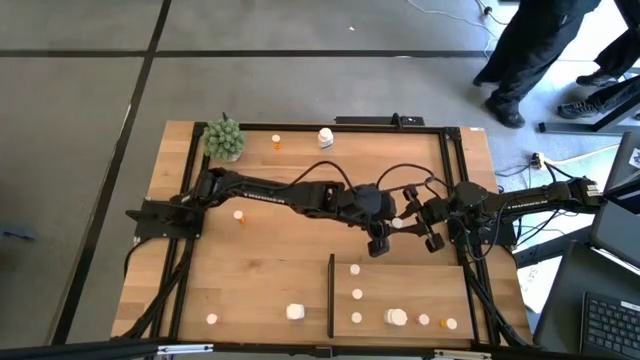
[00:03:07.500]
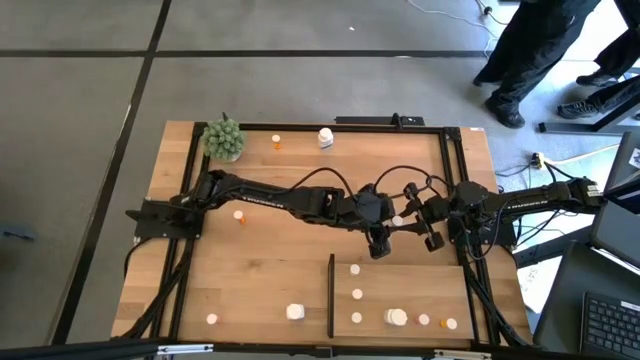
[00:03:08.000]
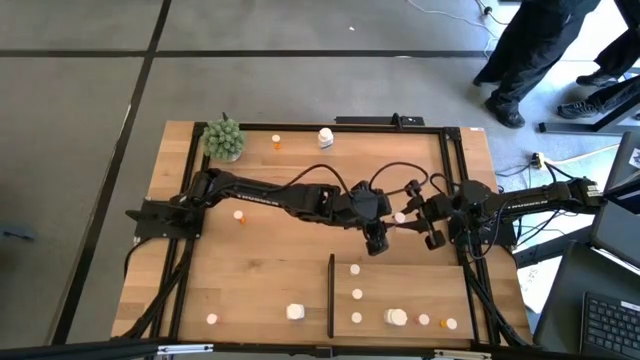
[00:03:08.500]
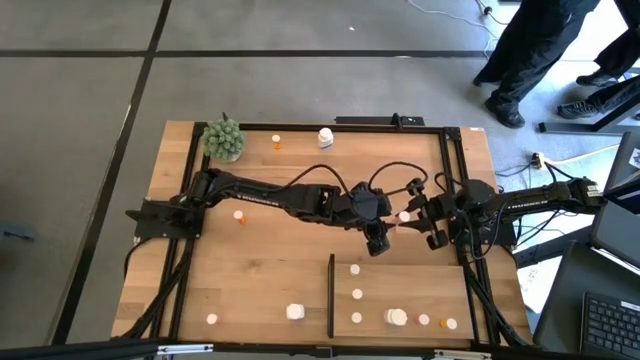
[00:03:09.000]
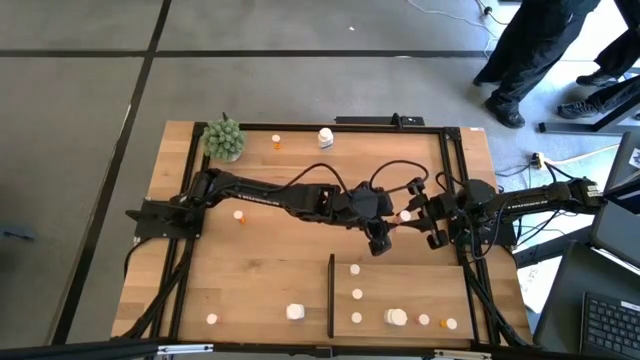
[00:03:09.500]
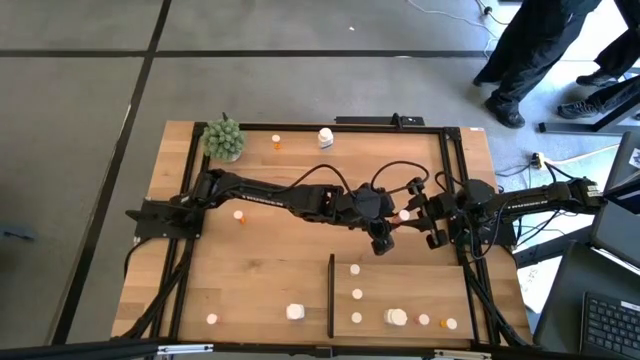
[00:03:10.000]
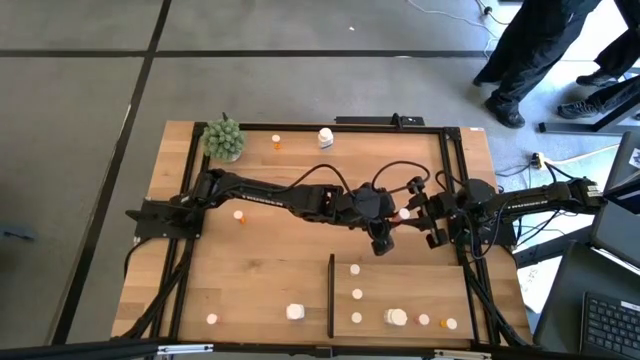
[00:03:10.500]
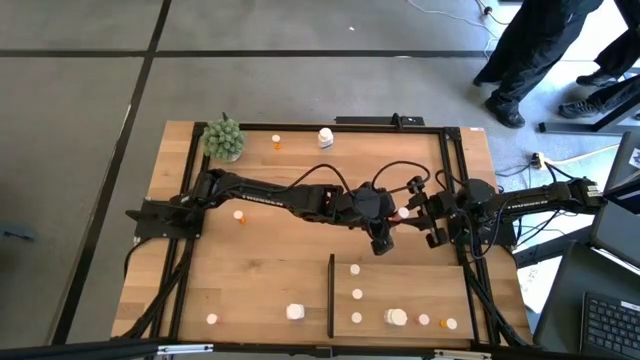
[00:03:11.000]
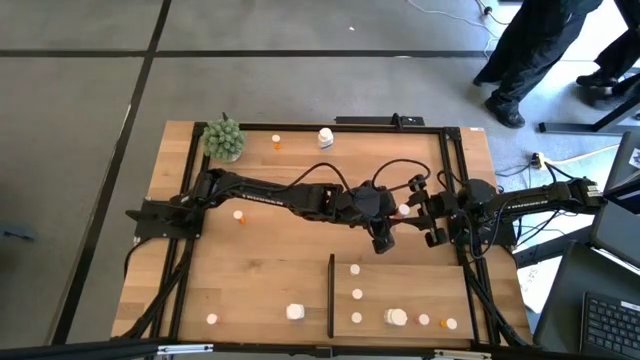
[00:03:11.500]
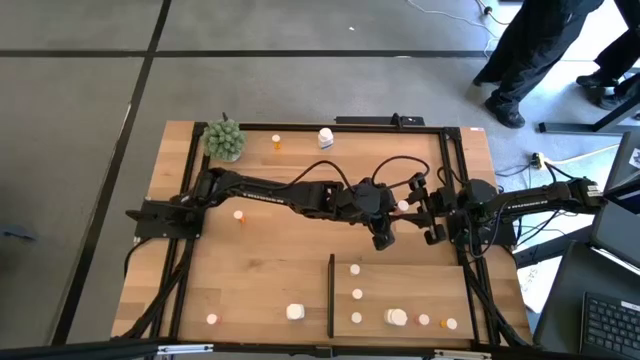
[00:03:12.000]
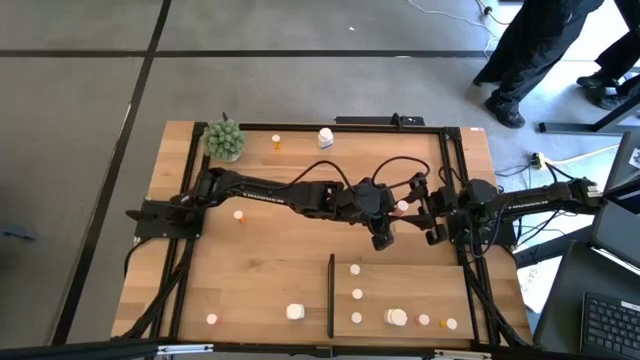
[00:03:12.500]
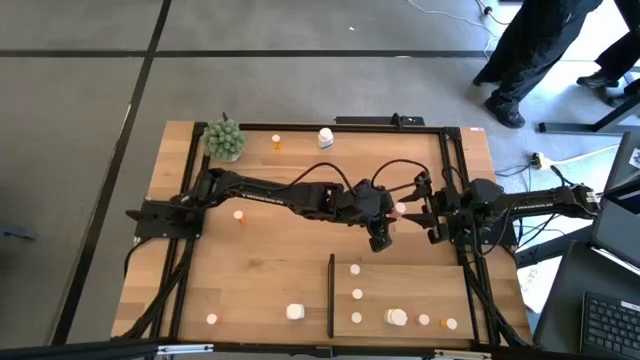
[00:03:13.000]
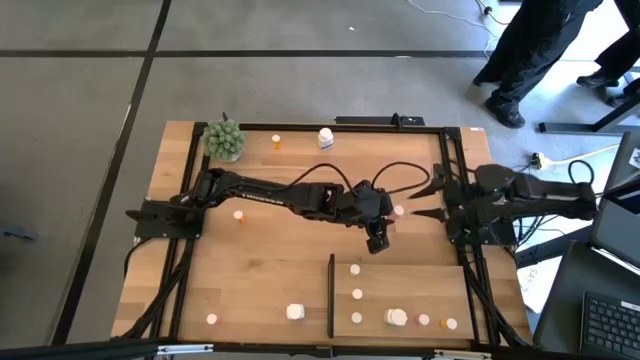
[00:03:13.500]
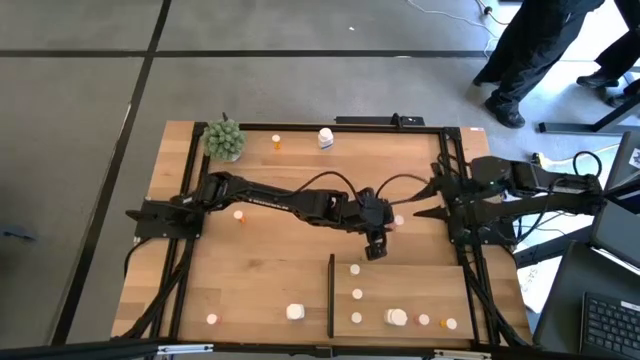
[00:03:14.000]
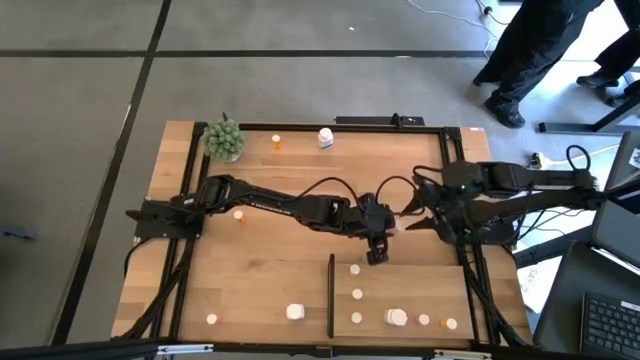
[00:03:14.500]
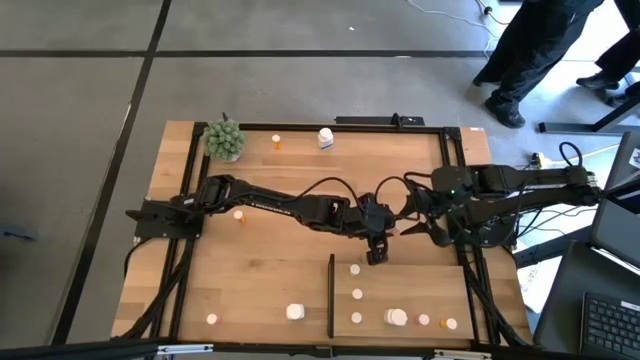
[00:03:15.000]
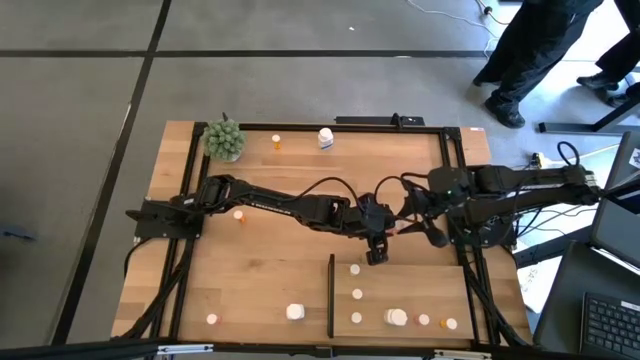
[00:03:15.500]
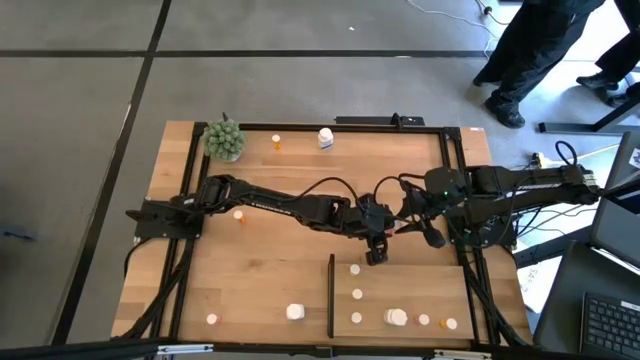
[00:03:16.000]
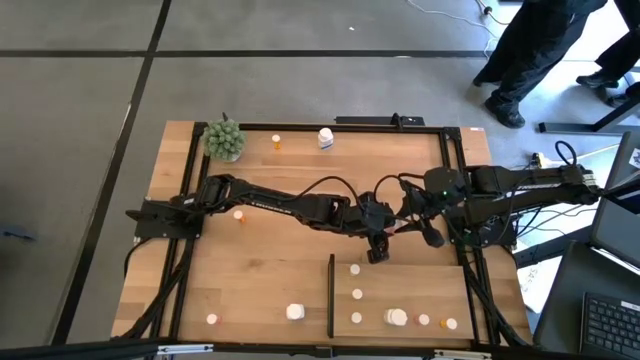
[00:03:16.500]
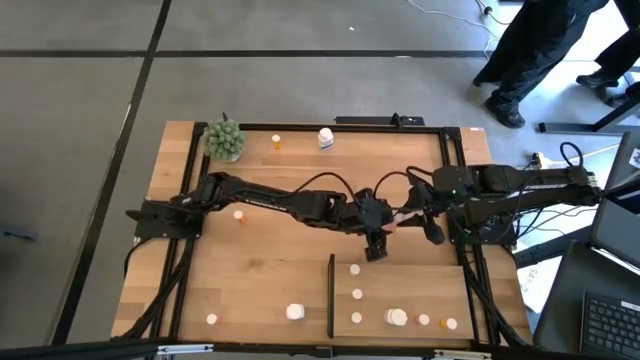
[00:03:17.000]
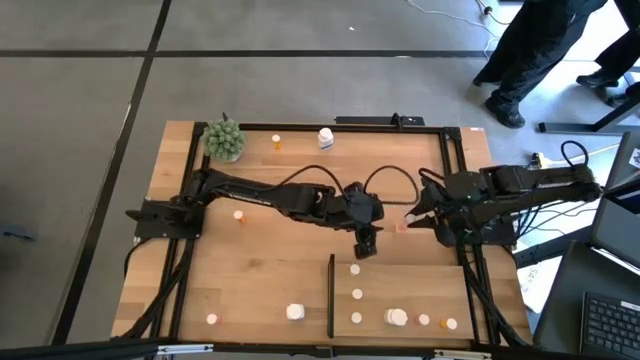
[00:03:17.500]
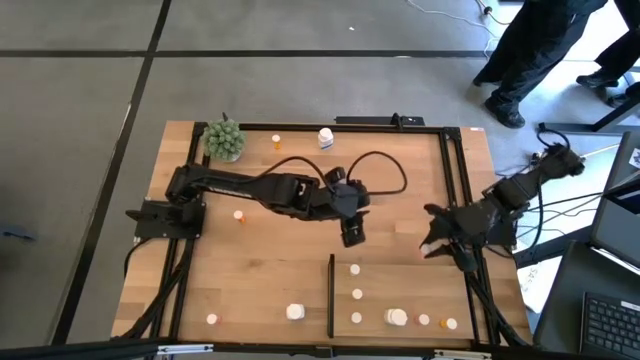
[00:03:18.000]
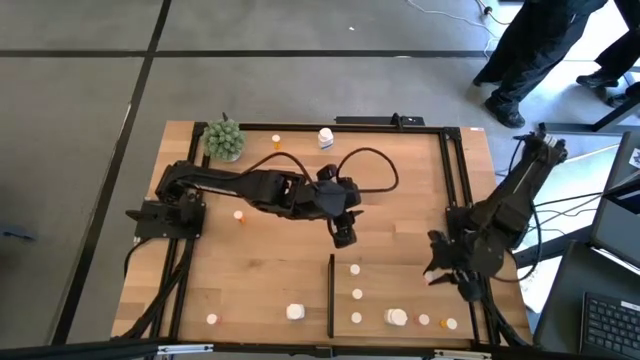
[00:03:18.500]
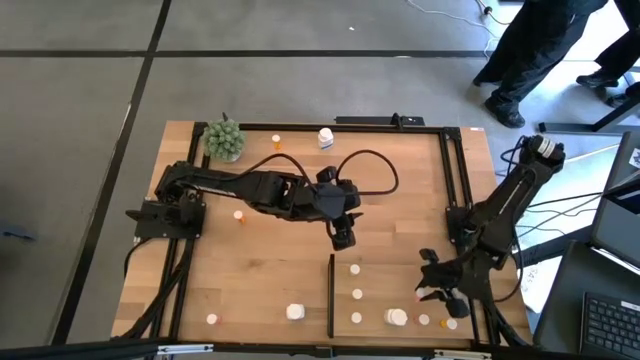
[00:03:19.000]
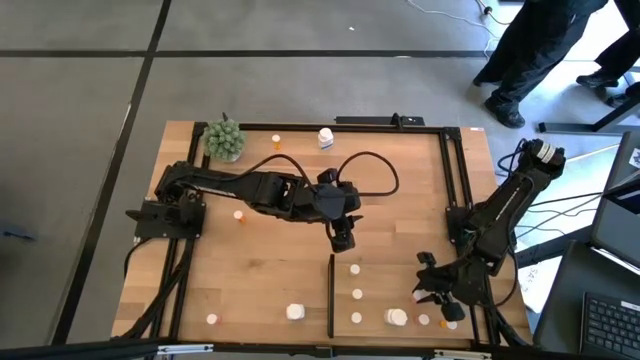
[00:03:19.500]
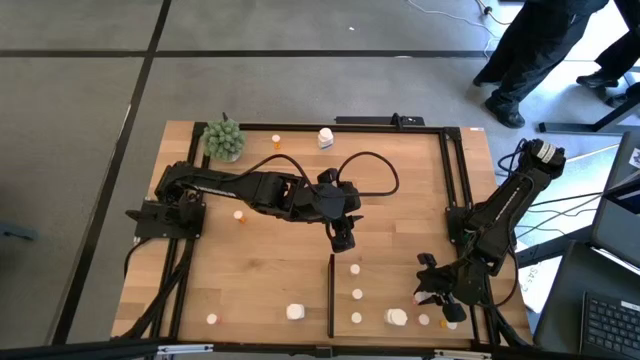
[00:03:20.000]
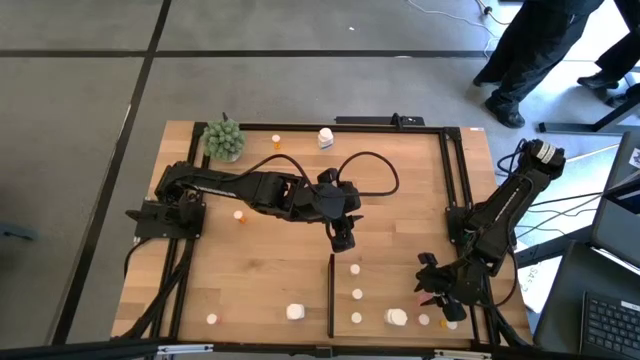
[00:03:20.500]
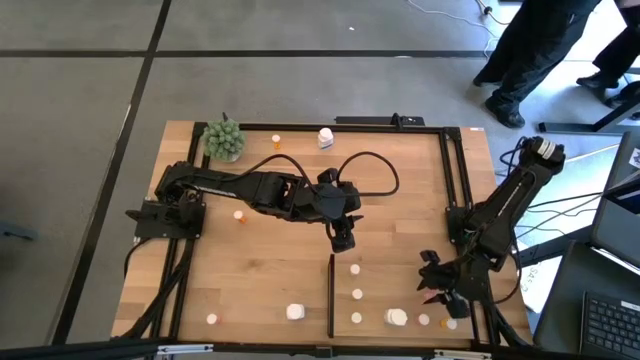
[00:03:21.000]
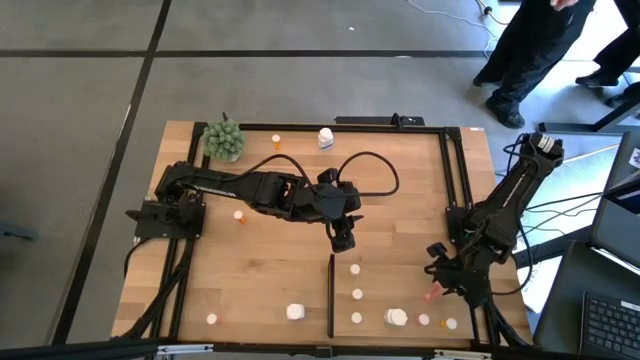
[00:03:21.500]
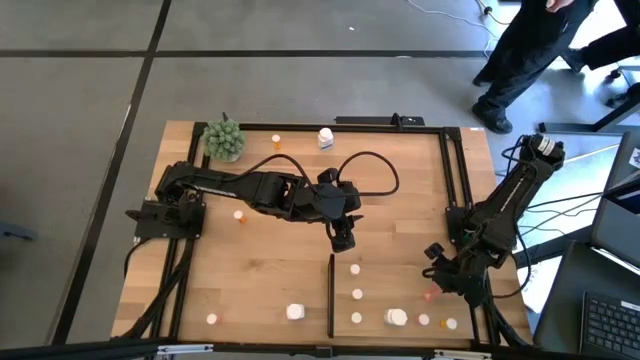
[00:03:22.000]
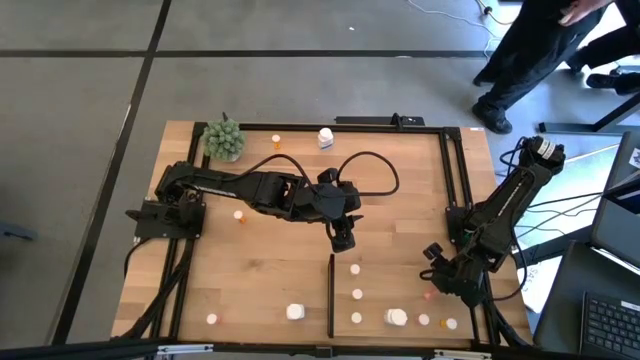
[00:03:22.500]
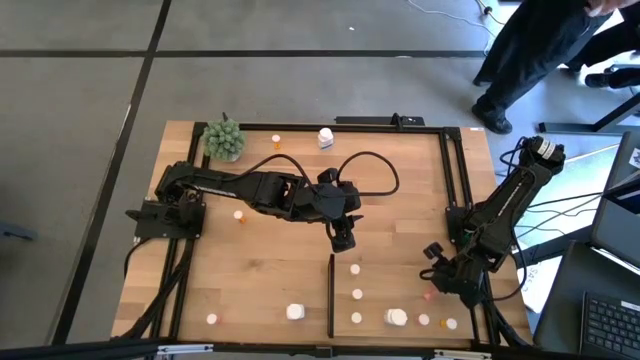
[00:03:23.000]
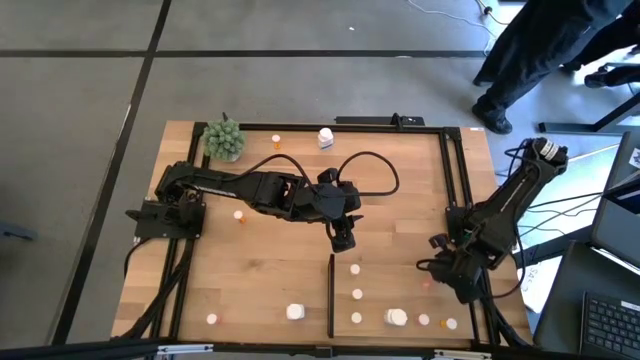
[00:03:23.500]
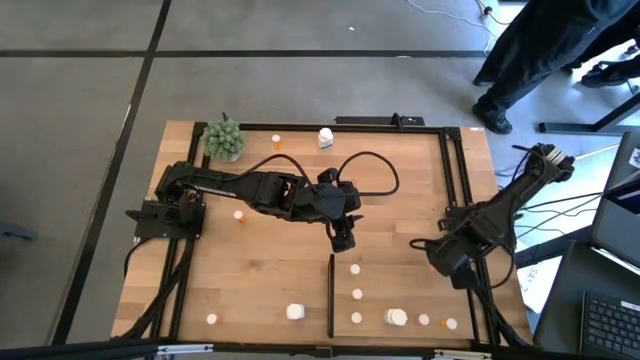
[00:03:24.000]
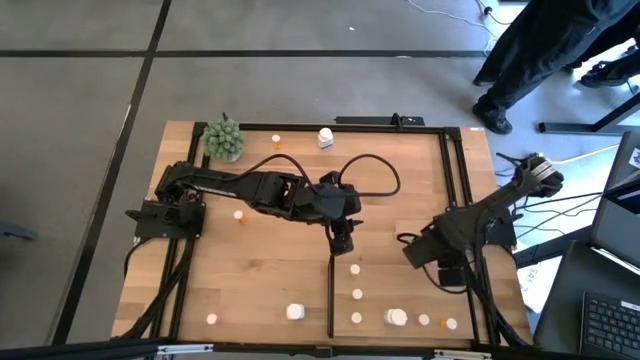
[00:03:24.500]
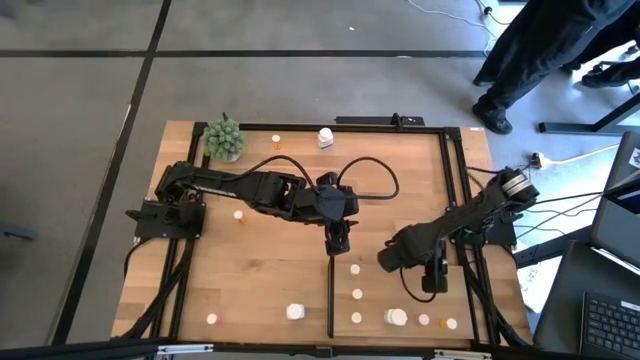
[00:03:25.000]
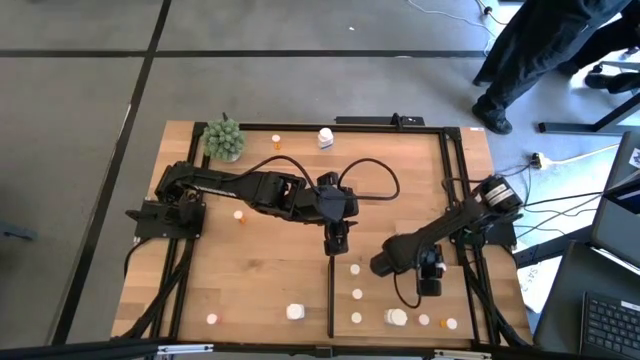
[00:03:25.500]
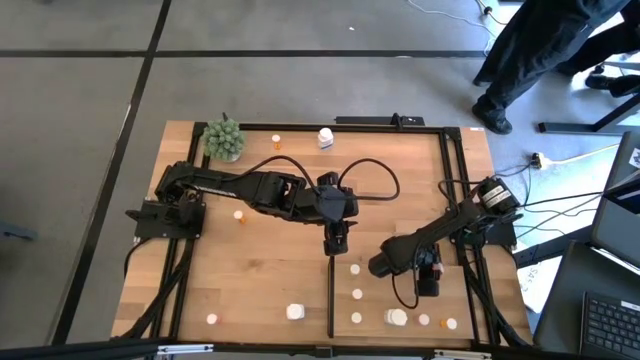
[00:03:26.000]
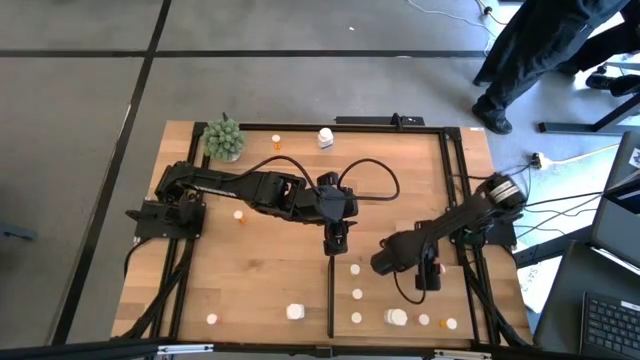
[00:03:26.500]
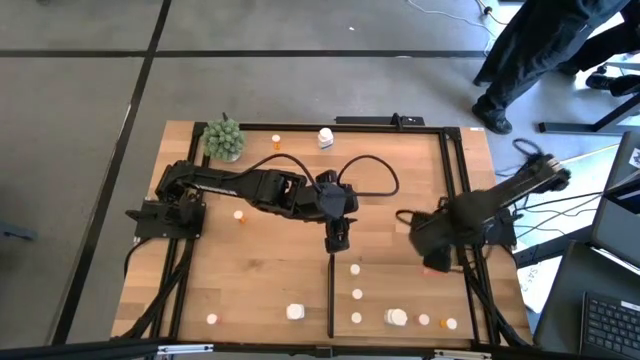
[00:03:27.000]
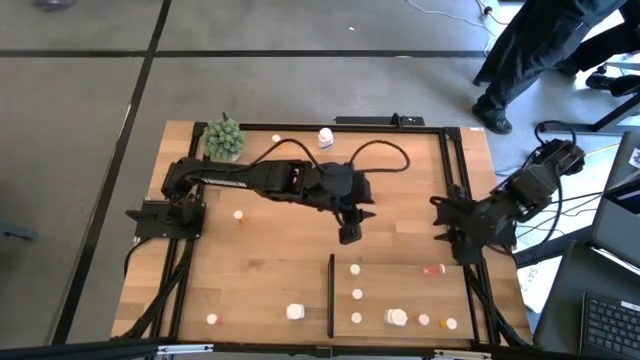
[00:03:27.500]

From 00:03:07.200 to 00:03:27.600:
Task: Pick and place medicine bottles onto shelf by color
Put the top pink pill bottle on the shelf aligned with the other pink pill bottle

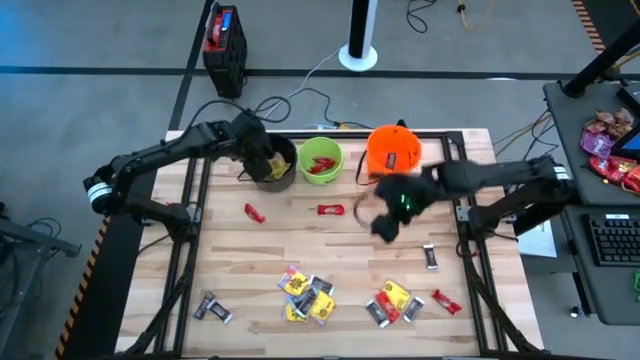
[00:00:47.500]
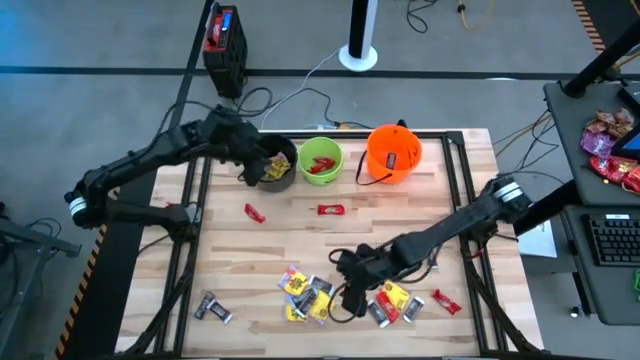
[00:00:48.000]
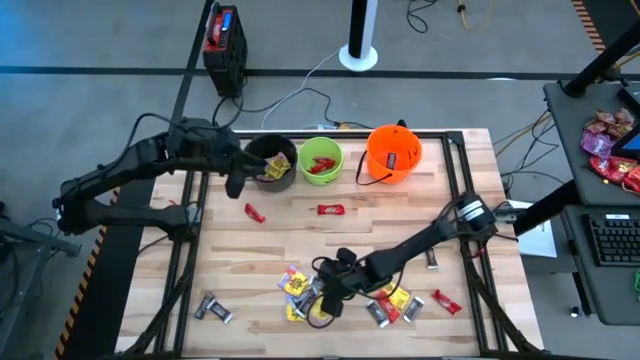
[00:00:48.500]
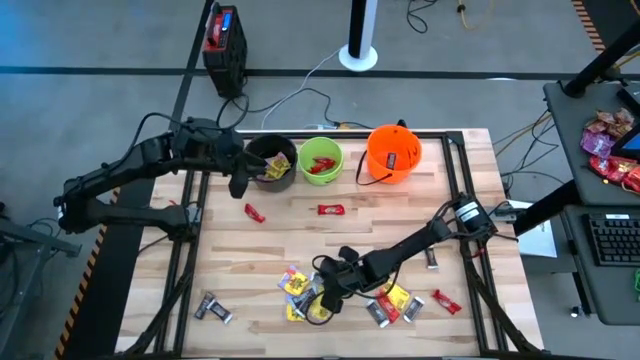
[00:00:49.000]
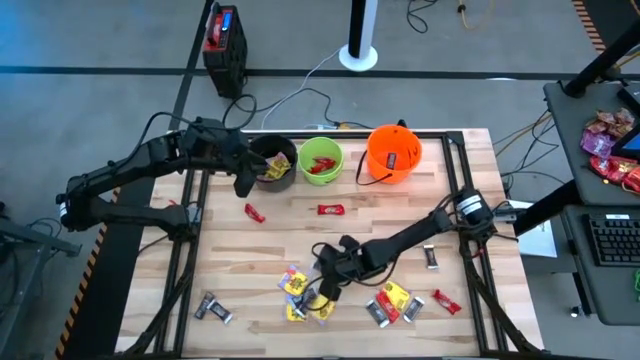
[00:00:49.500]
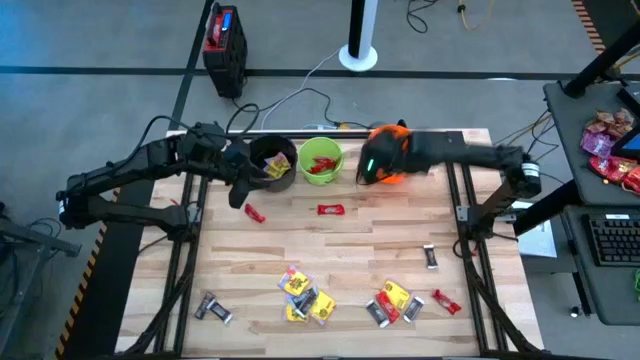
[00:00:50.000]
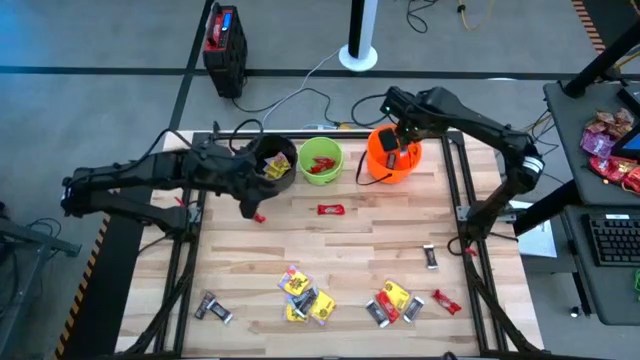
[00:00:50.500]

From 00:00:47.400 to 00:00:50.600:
Task: Sort candy by brand, put in halloween buckets
Put the brown chocolate bar into the orange bucket
